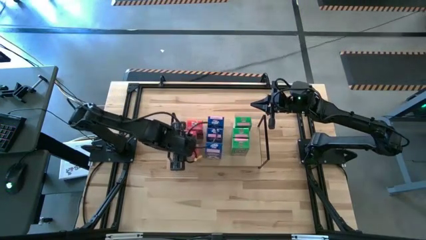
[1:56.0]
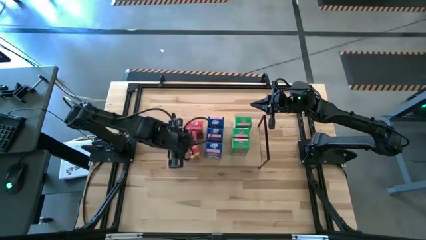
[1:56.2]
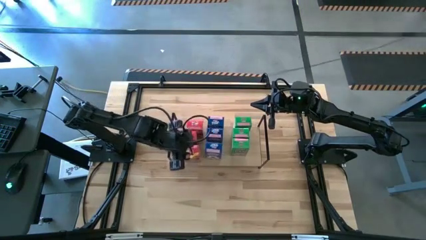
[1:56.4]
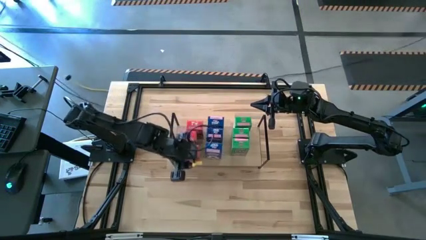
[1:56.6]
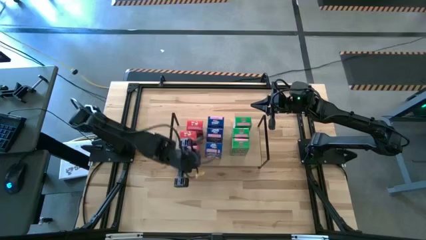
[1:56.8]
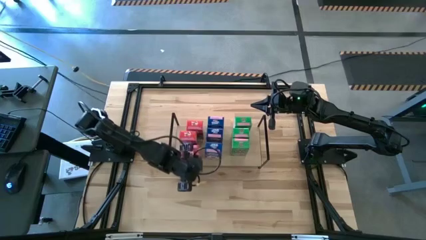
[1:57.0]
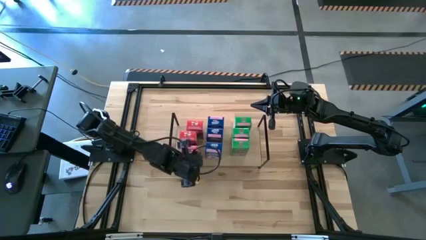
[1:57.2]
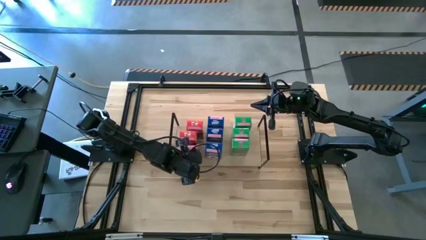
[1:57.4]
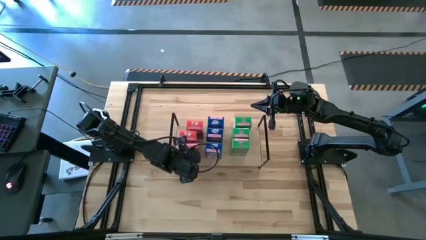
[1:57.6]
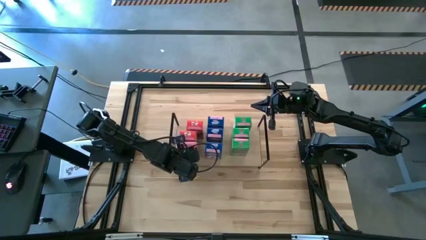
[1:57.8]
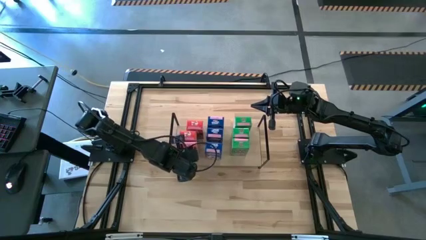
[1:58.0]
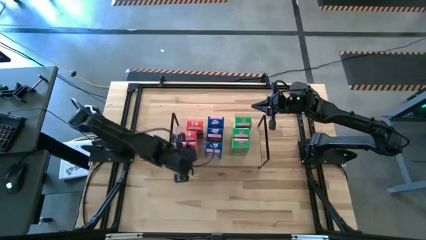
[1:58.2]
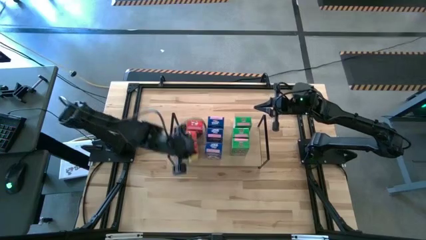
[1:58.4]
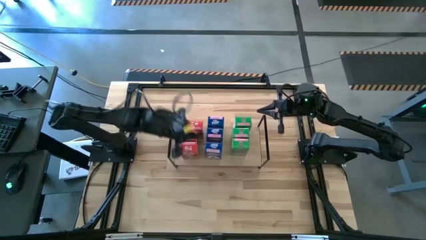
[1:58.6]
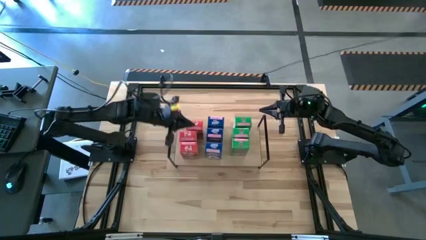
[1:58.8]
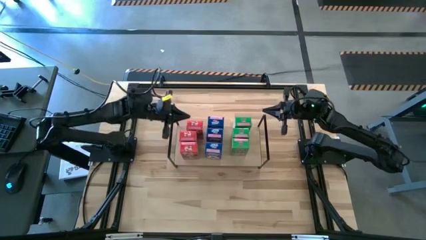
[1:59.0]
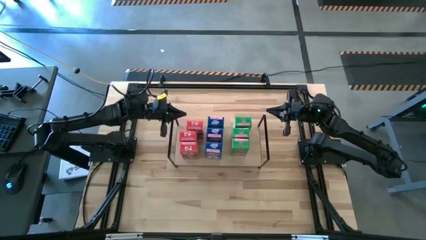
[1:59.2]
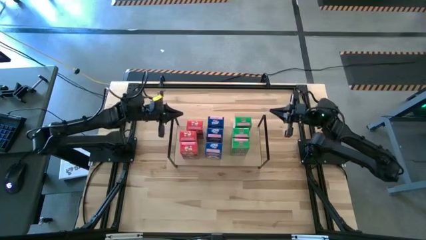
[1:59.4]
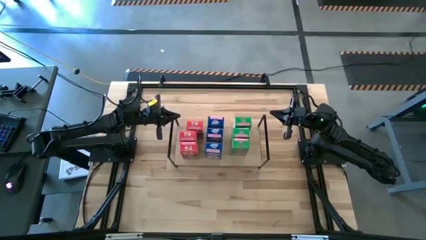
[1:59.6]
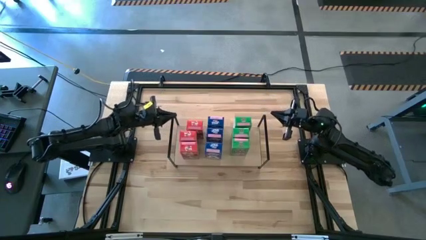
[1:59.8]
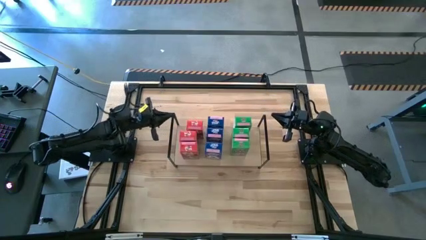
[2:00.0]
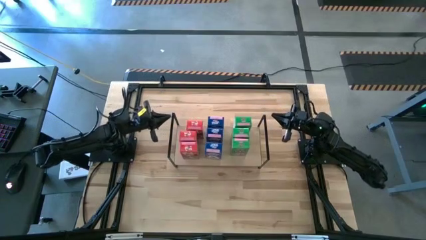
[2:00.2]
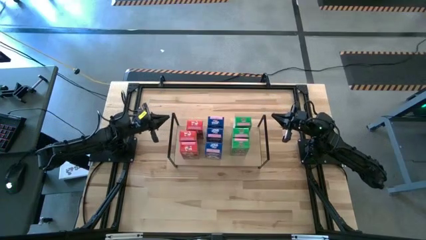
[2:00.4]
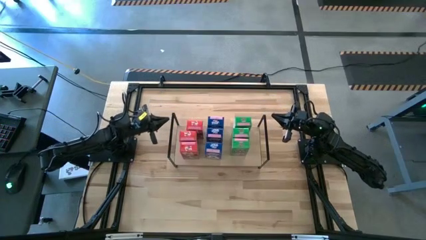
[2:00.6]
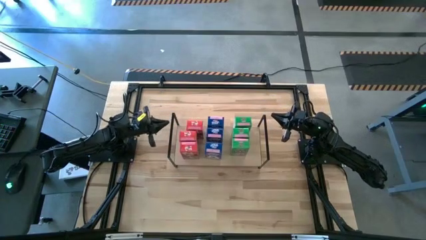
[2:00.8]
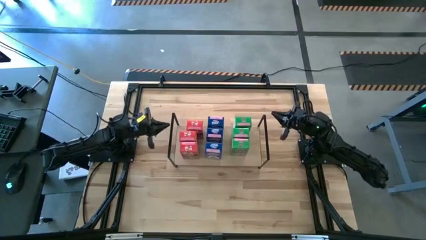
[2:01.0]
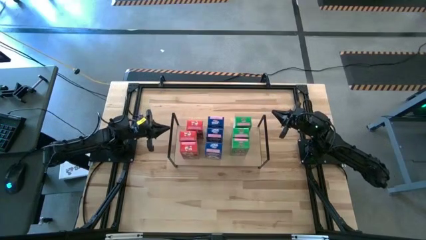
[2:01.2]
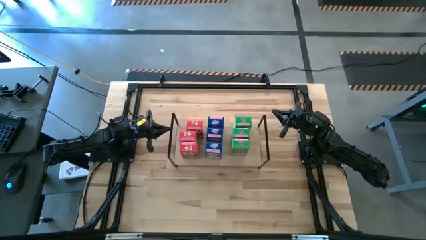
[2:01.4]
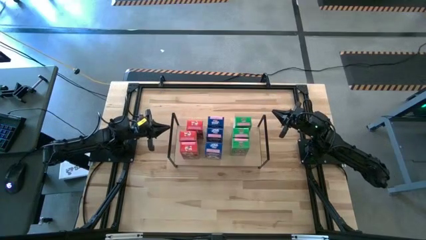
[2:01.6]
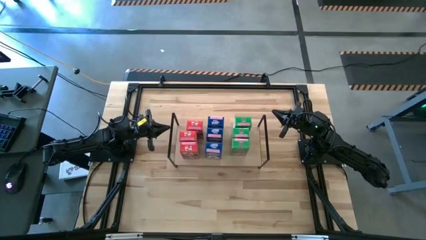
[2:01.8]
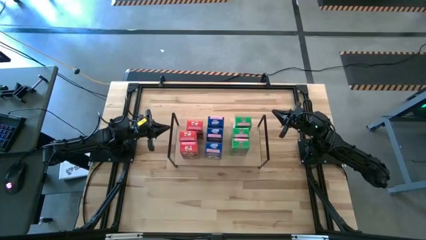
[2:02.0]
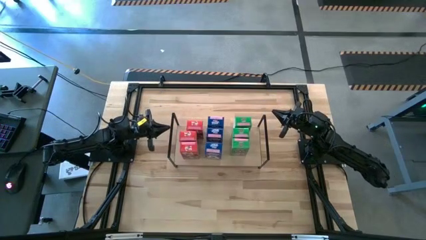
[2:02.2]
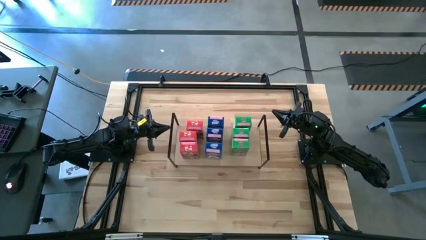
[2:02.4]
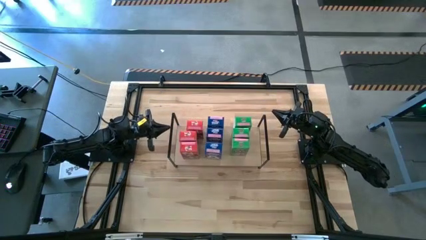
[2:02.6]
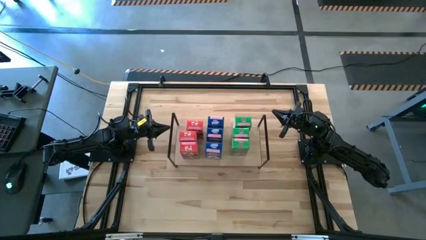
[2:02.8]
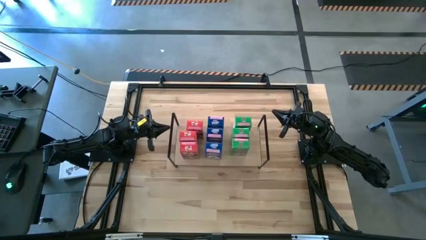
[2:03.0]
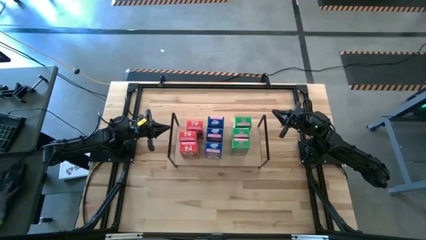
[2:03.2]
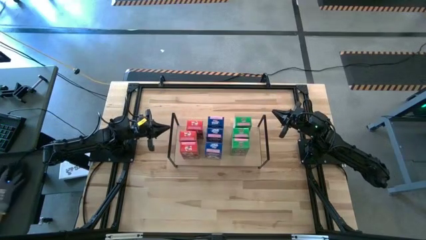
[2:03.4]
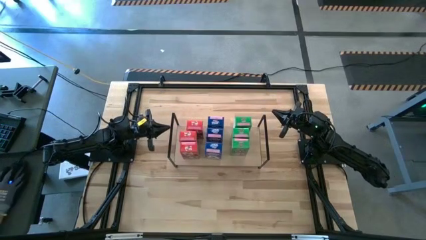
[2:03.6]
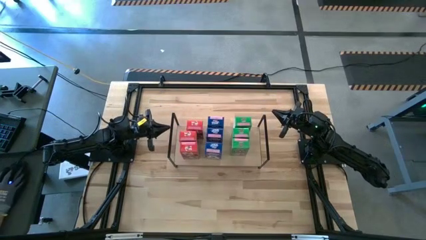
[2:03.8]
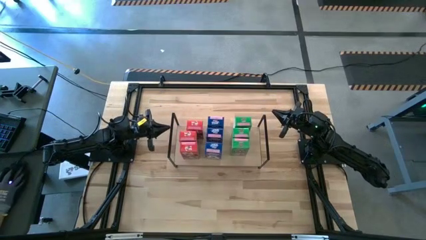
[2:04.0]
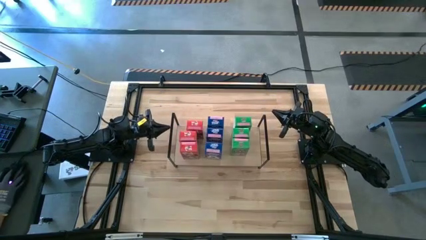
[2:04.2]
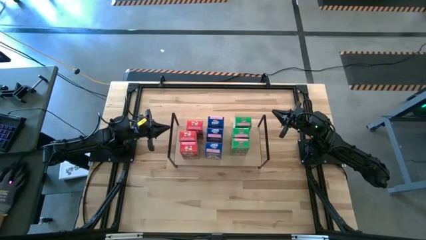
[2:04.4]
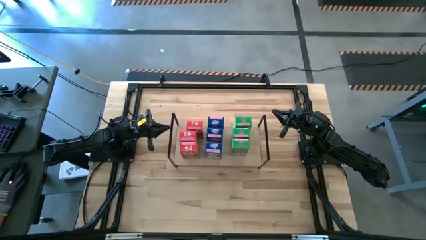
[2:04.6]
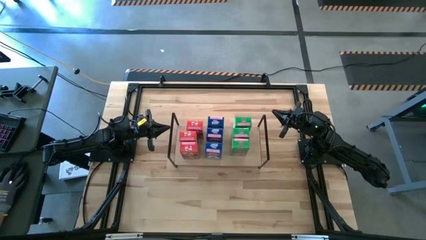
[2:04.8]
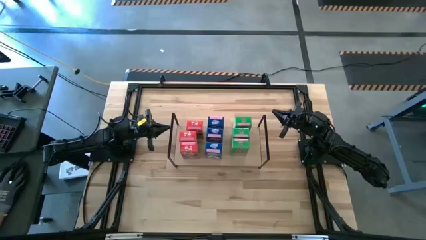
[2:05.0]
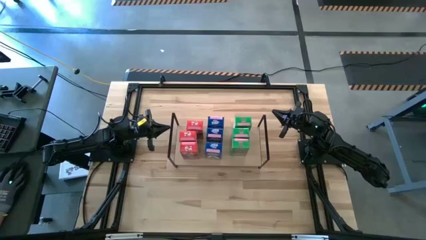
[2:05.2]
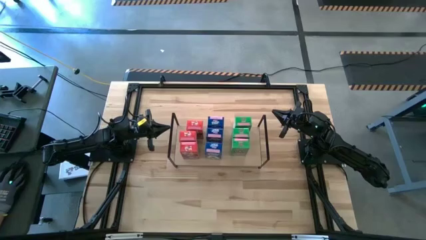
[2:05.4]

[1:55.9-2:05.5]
Task: Stack cereal on shelf
Return to Home Position

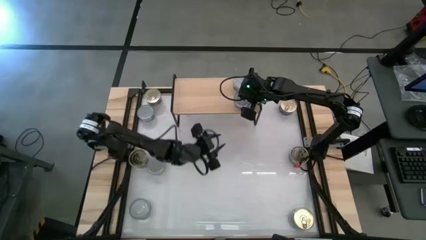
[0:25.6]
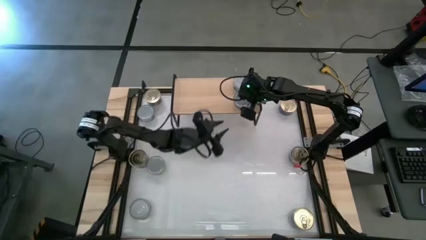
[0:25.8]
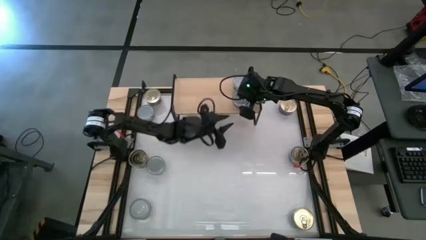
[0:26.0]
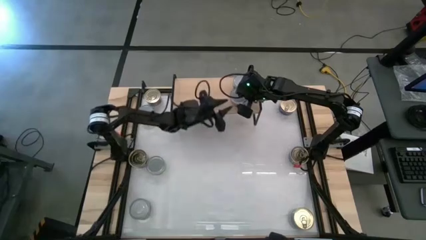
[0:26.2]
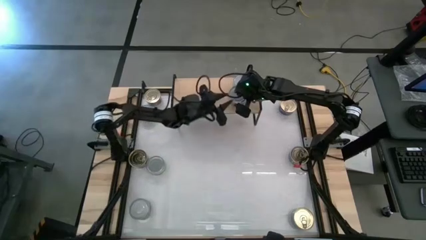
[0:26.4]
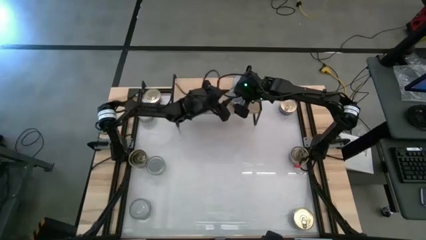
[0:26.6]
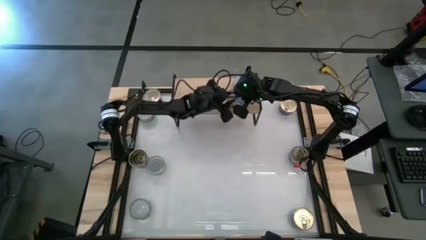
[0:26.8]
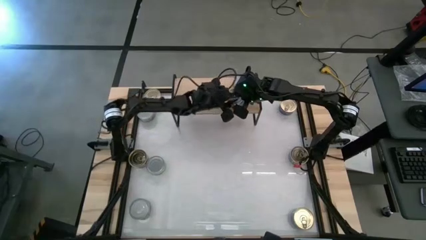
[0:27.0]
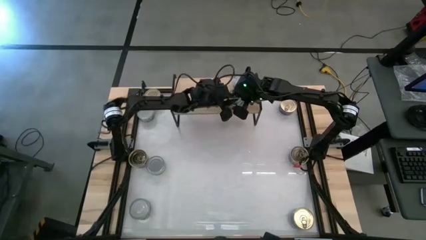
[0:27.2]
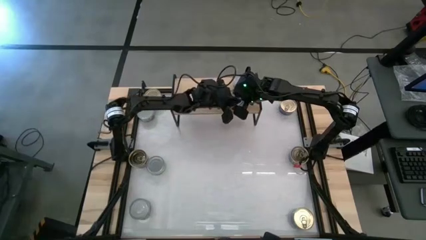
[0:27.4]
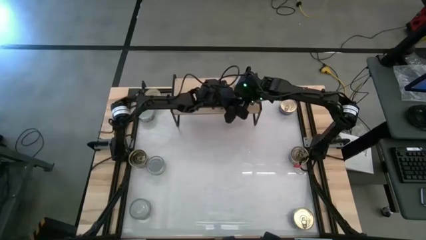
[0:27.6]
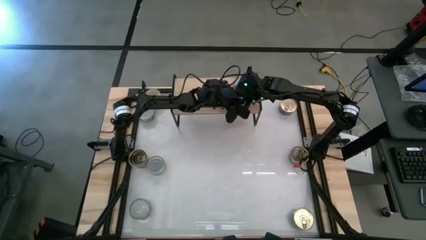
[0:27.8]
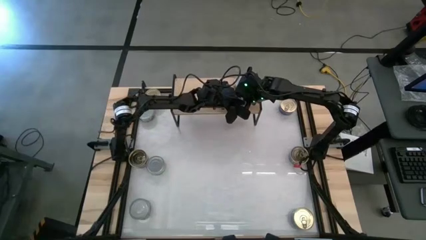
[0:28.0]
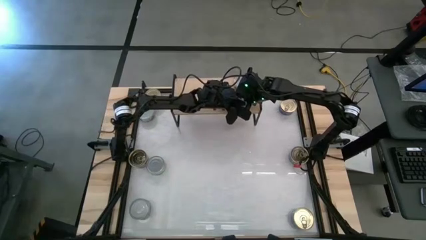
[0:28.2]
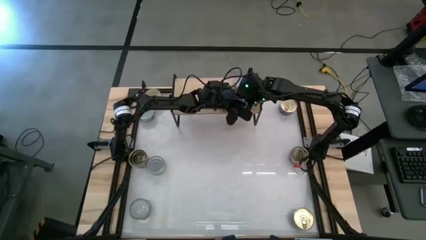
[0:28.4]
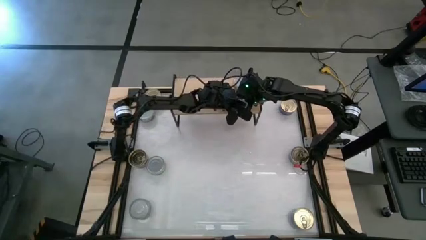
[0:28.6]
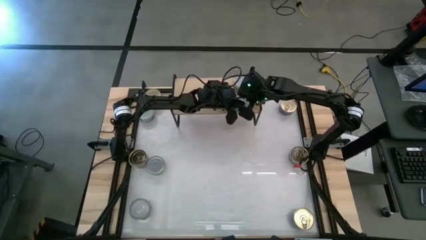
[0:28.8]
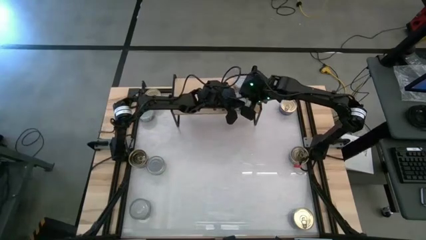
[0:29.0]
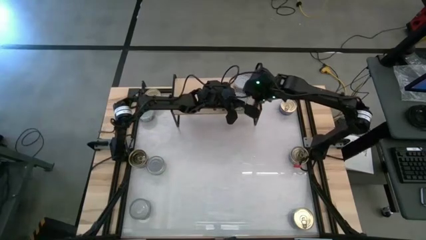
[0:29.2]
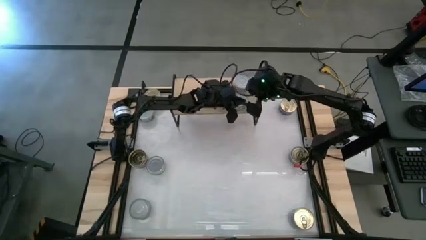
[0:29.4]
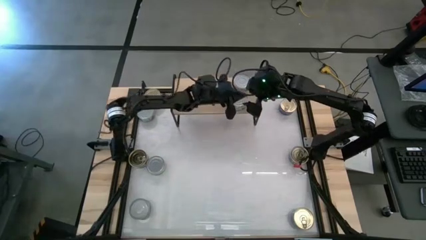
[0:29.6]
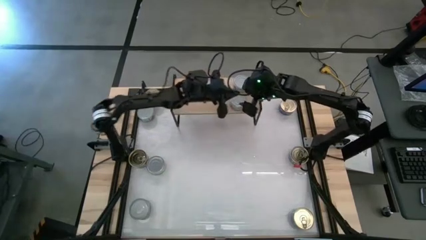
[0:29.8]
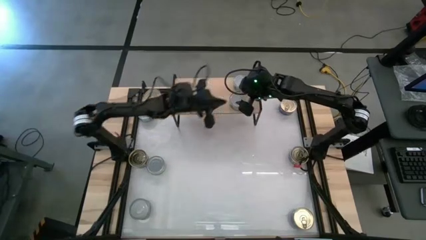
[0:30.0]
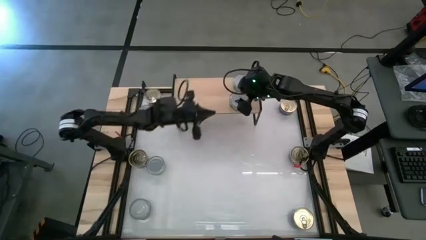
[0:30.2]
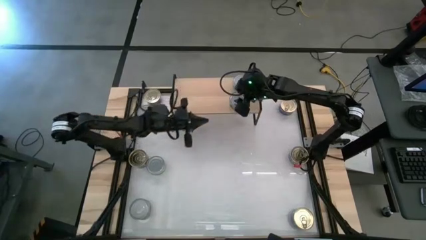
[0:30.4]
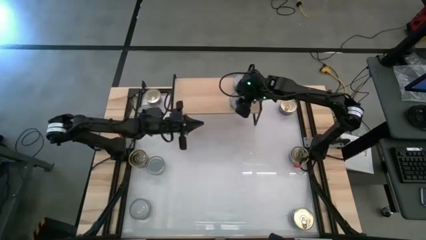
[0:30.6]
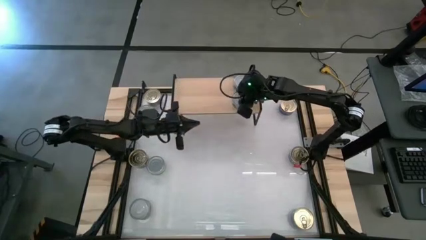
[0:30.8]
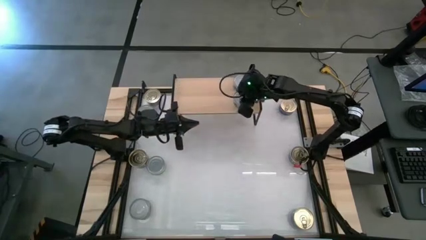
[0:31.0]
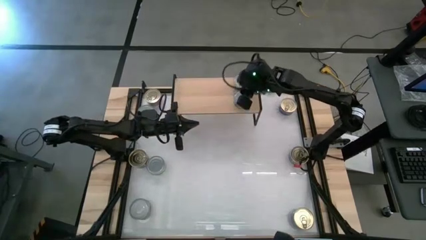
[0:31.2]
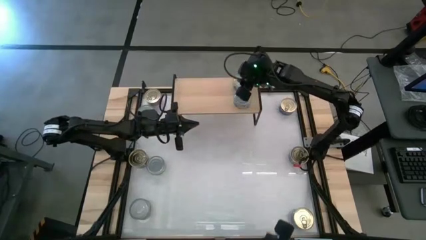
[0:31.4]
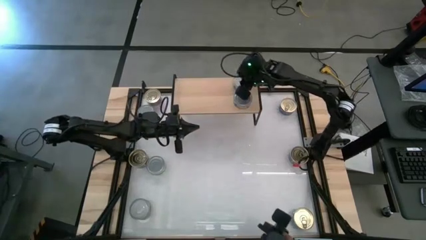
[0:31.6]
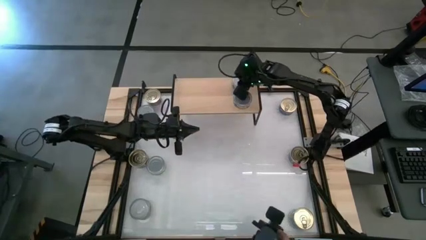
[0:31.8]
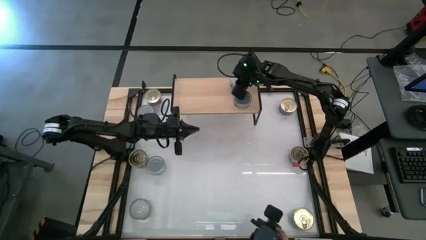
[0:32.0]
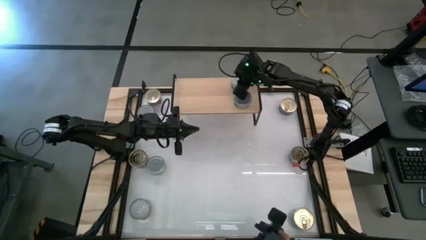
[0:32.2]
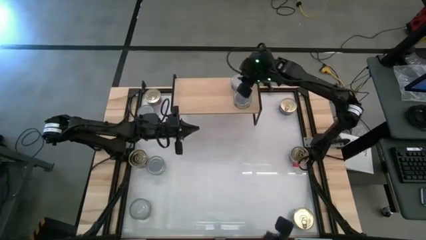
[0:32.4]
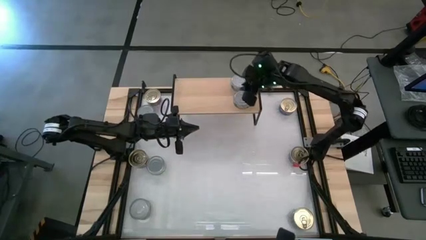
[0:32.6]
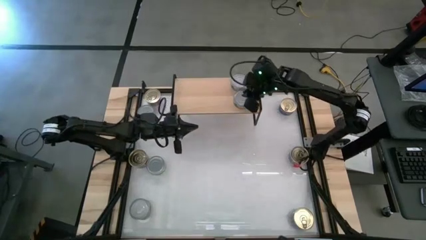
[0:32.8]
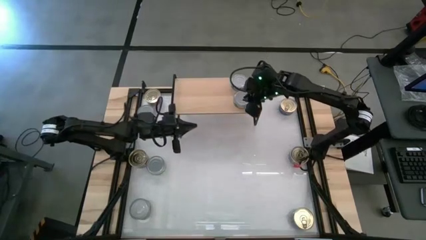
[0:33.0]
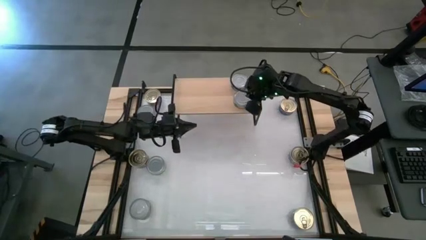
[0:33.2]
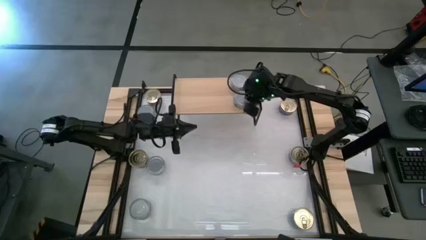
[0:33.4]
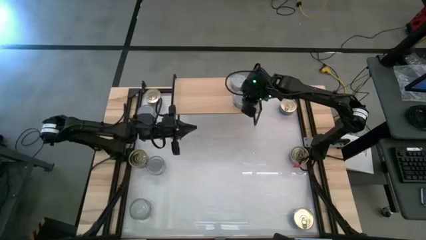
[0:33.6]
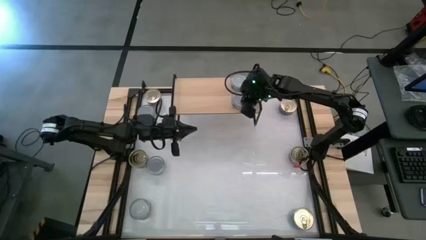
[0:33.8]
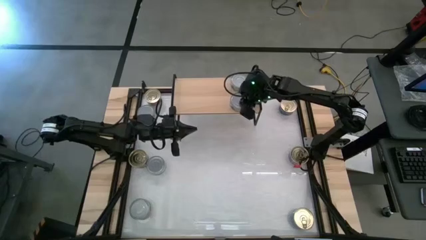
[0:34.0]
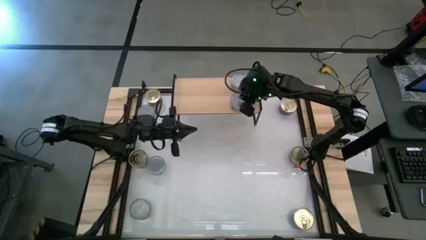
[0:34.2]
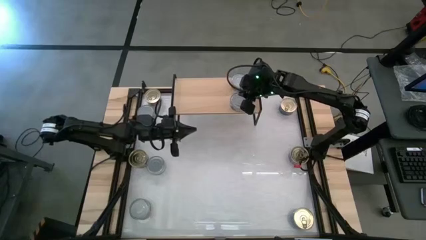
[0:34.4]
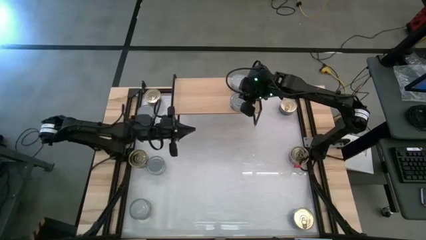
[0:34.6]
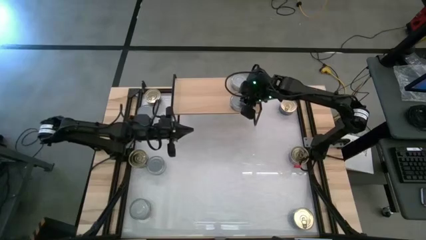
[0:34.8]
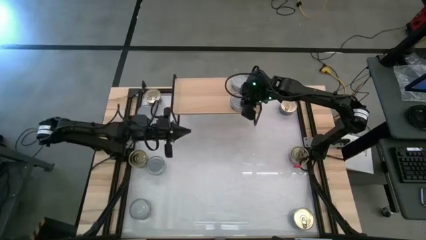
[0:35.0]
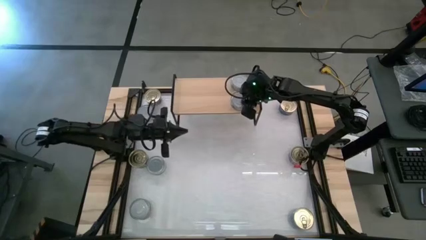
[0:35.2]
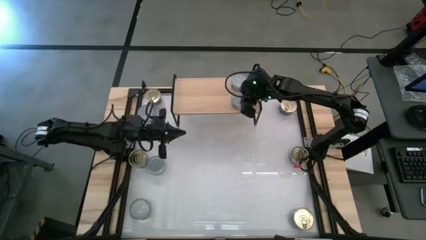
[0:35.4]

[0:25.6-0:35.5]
Task: Stack canned seafood by type on shelf
Put the right green tuna can on the shelf aligned with the other green tuna can on the shelf
